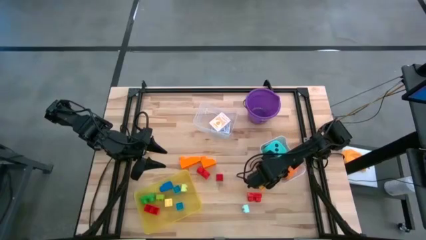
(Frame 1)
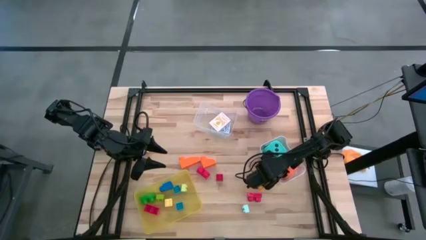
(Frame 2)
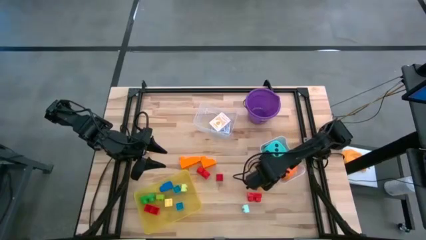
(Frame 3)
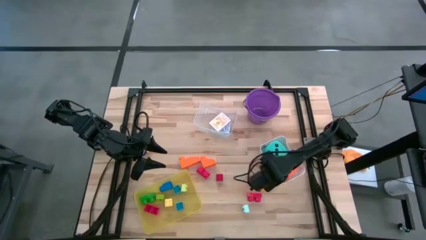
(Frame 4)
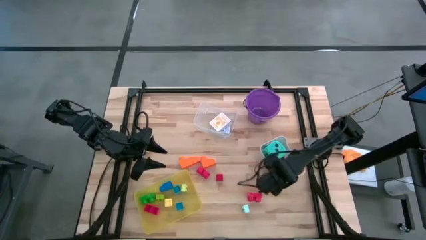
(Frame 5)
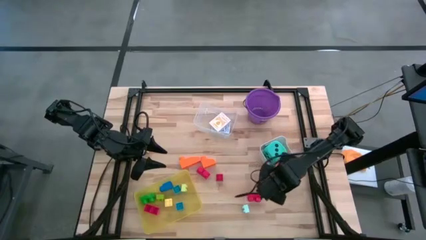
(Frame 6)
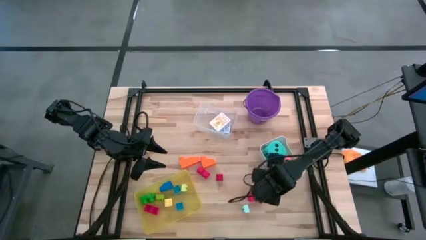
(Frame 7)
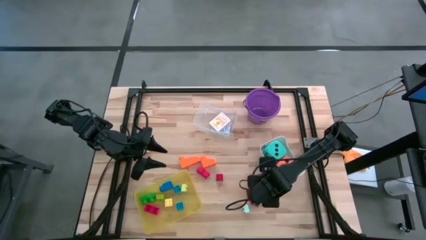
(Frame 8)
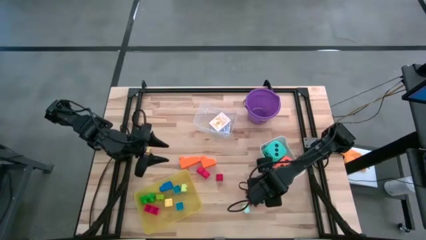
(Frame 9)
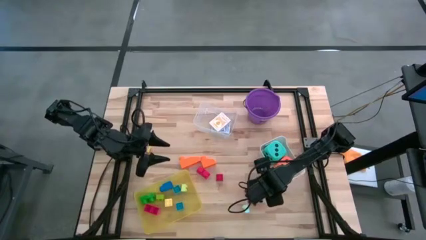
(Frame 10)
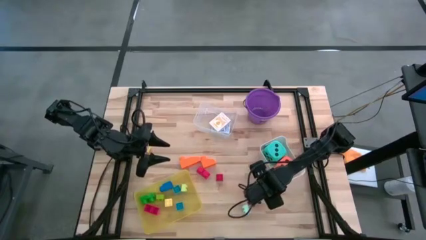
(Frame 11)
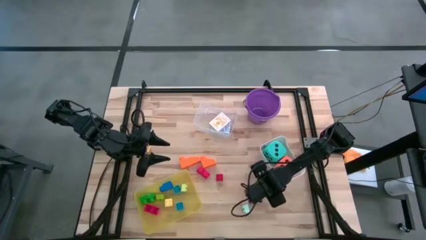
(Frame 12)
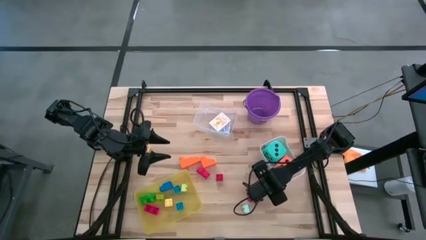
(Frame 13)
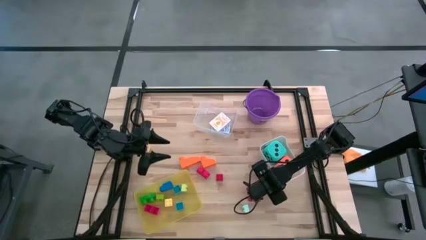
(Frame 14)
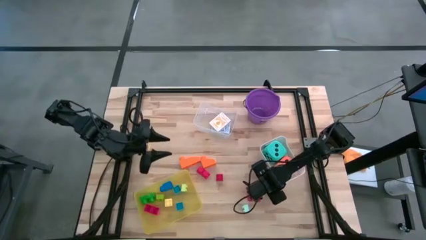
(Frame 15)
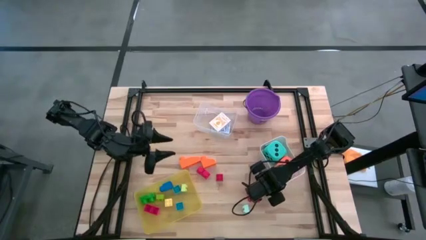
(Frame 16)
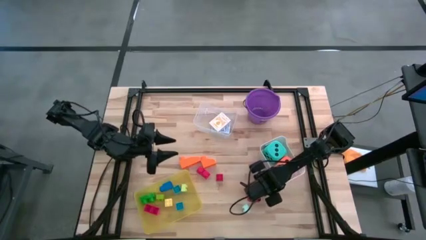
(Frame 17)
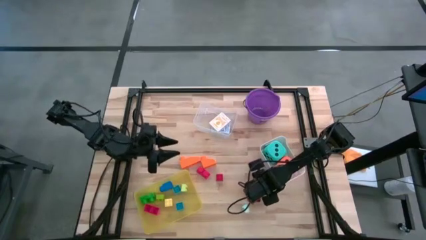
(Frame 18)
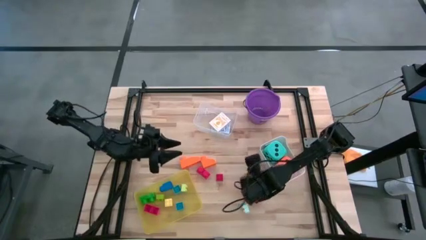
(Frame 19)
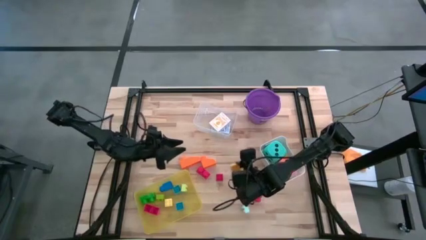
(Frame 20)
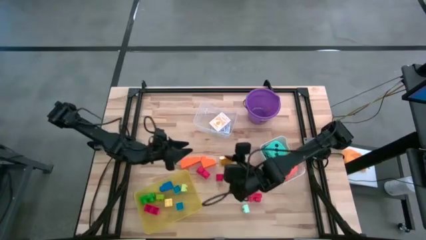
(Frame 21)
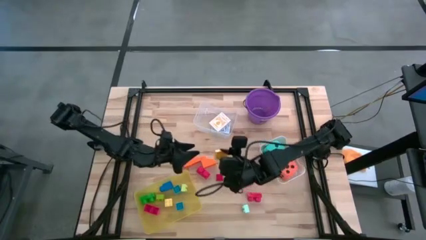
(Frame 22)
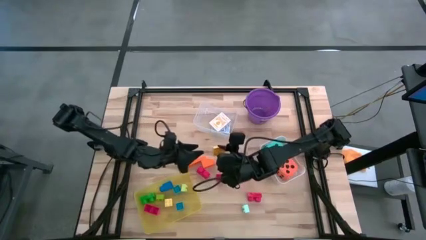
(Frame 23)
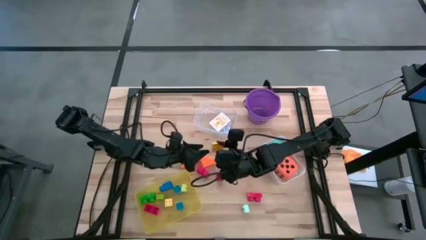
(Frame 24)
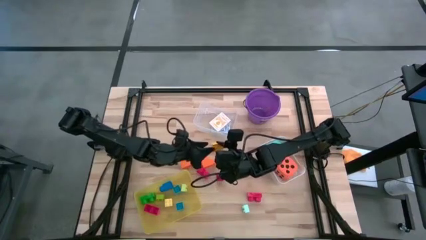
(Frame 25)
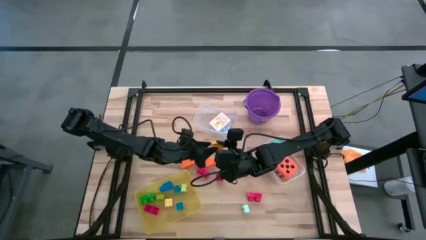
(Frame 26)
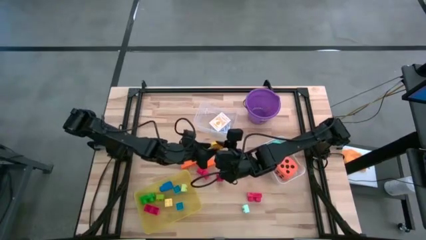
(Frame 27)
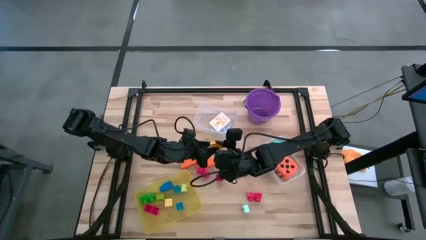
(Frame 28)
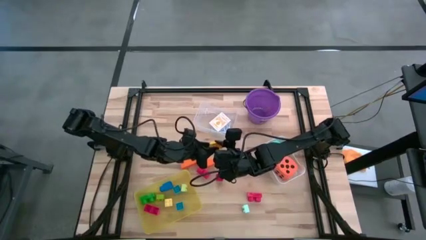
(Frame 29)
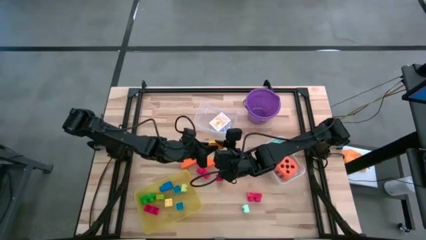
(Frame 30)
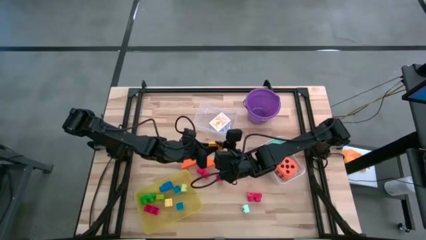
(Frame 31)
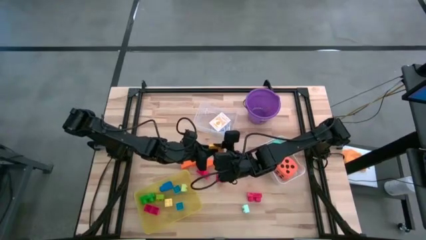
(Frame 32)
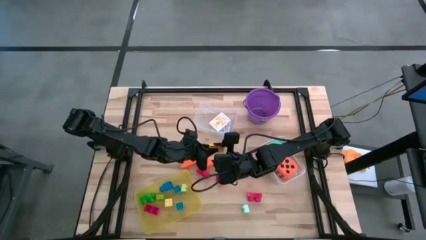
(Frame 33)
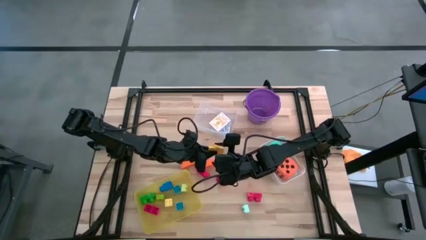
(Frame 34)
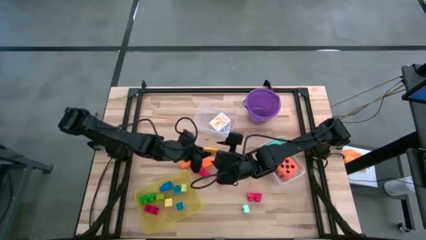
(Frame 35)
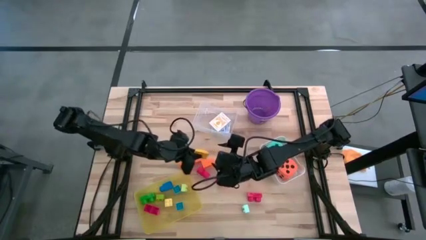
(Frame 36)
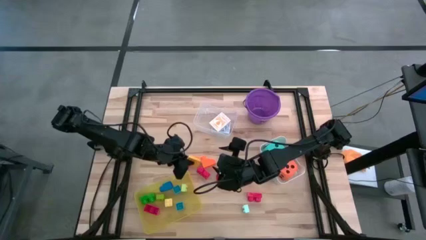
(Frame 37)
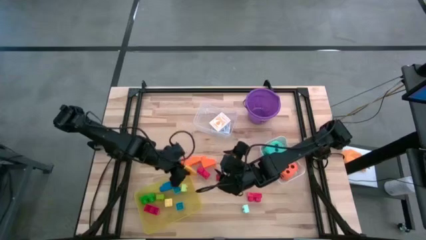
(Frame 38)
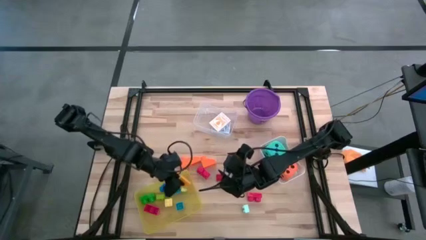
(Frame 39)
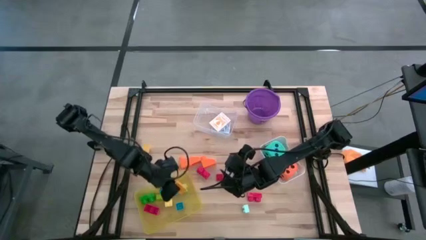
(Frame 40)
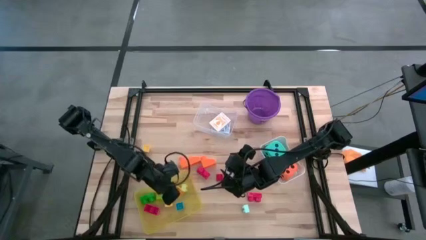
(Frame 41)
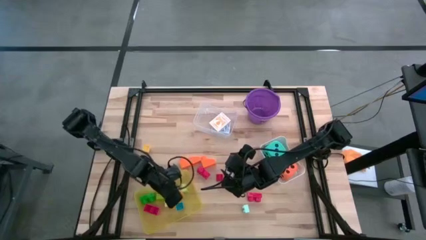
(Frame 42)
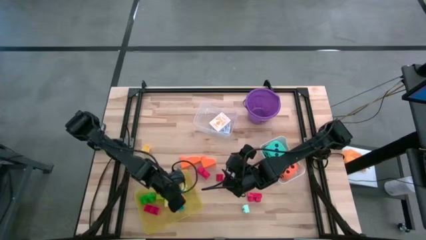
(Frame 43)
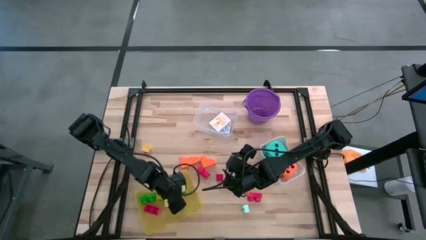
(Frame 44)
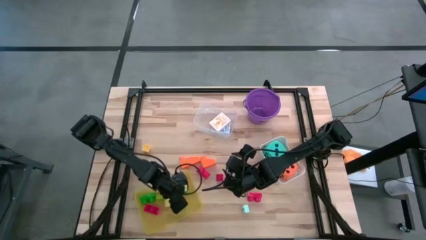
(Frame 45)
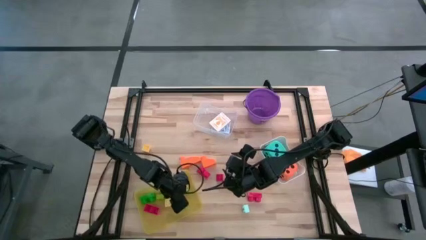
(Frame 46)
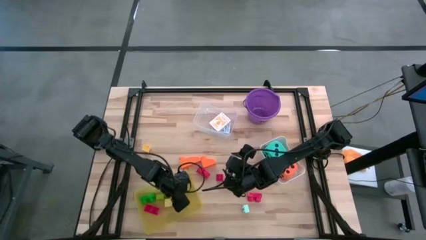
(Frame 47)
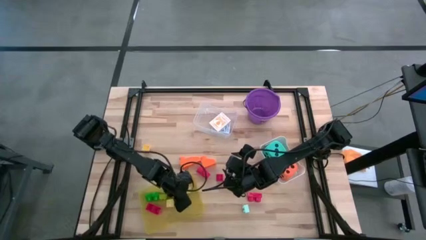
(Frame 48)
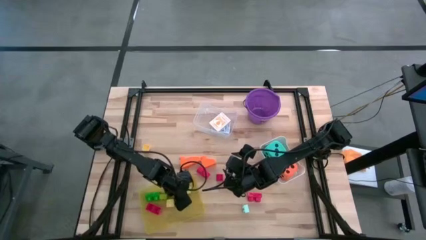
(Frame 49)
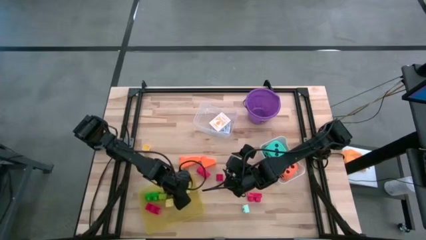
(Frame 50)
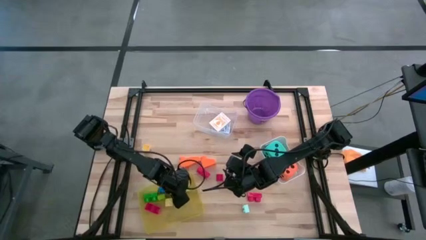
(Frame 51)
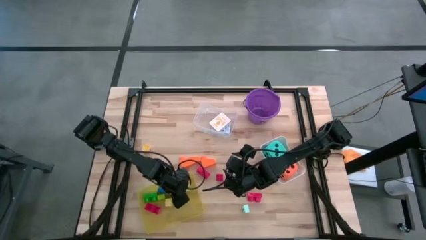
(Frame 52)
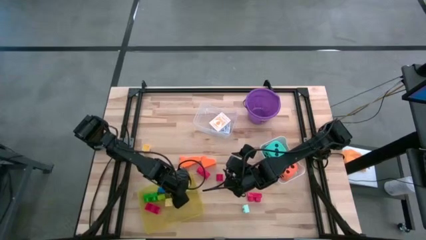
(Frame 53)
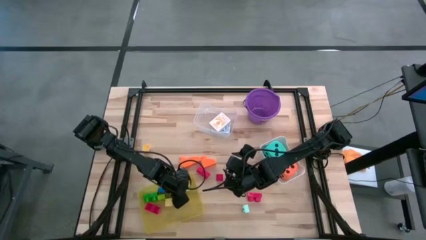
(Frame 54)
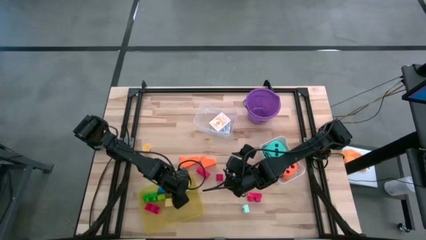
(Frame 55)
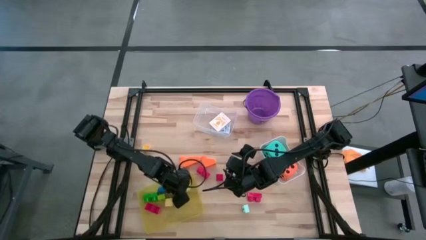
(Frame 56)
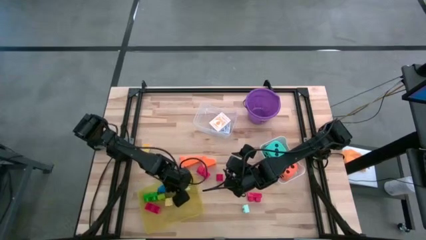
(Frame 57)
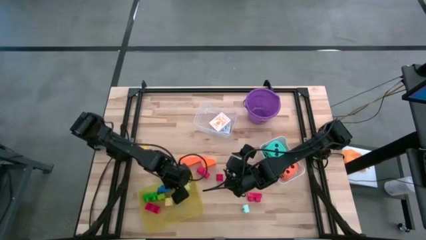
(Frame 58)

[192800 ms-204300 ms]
Task: Pick & Place Toys
Put the yellow game piece into the yellow bin
